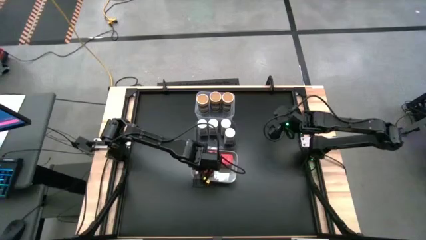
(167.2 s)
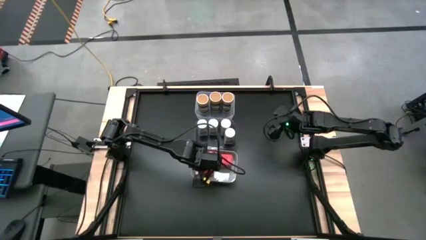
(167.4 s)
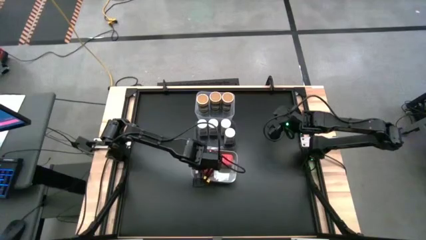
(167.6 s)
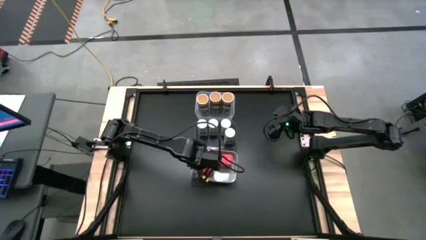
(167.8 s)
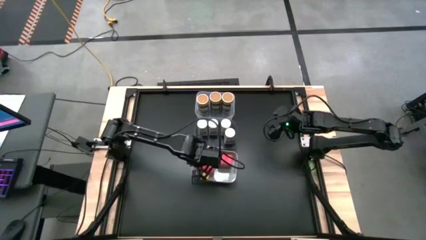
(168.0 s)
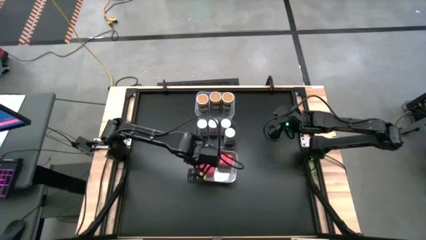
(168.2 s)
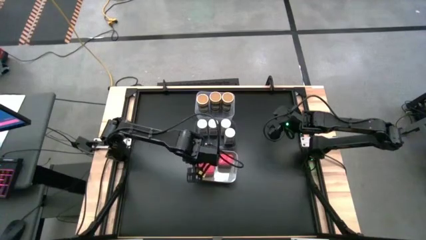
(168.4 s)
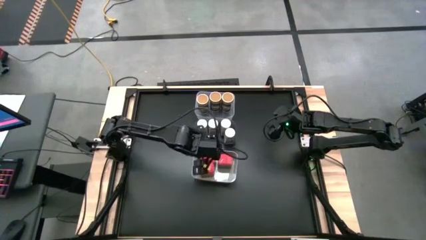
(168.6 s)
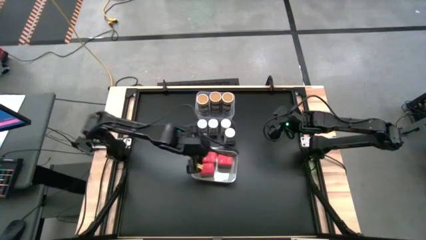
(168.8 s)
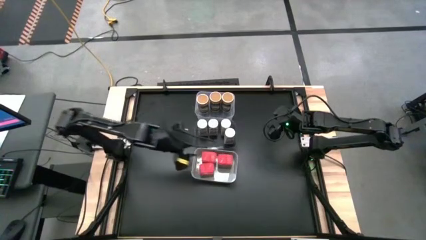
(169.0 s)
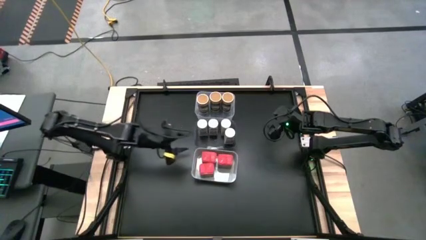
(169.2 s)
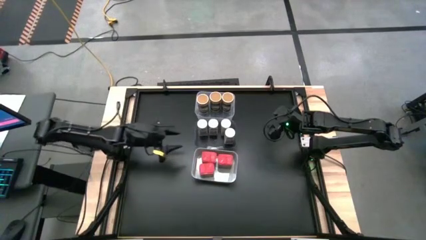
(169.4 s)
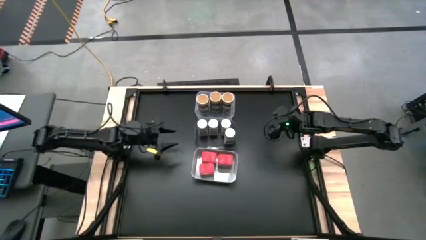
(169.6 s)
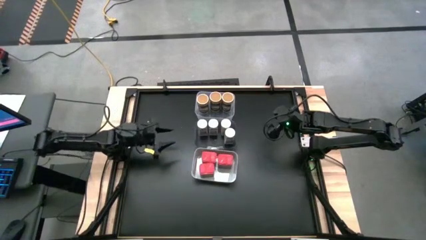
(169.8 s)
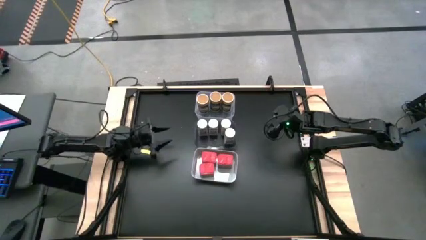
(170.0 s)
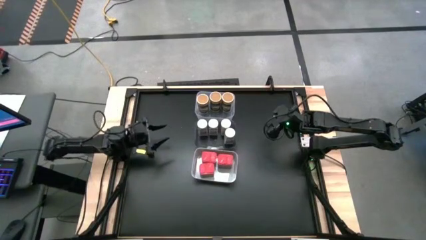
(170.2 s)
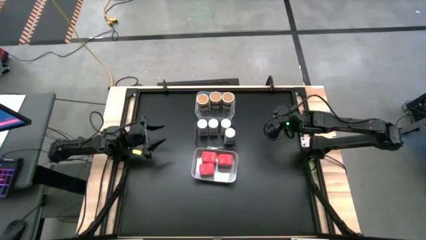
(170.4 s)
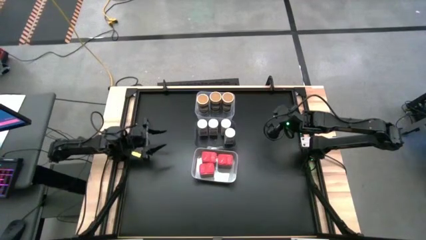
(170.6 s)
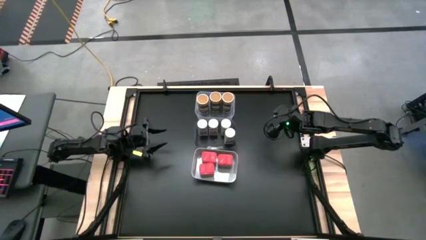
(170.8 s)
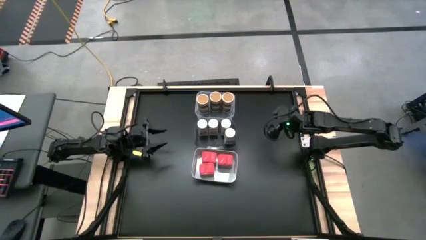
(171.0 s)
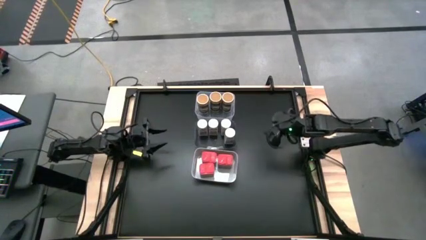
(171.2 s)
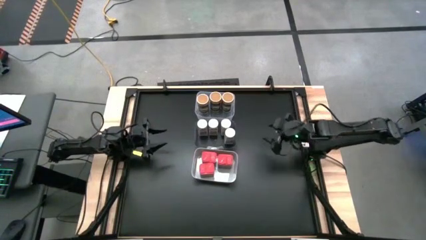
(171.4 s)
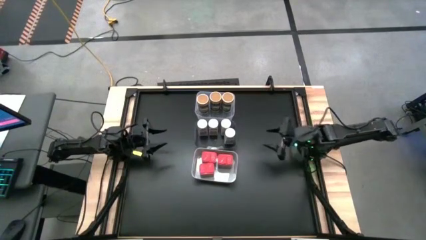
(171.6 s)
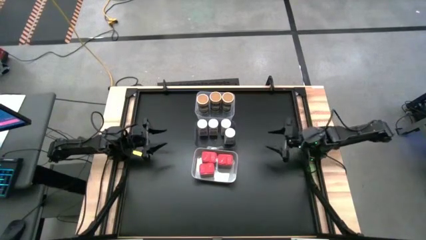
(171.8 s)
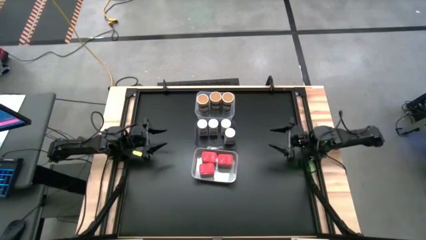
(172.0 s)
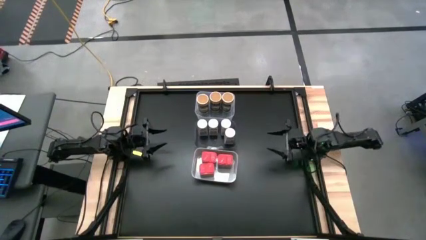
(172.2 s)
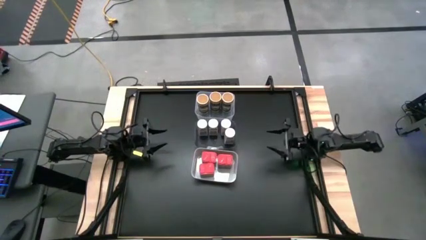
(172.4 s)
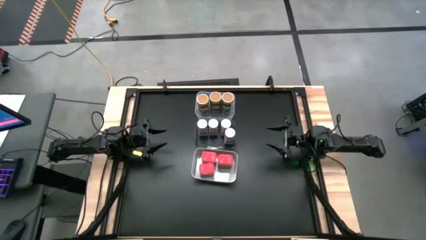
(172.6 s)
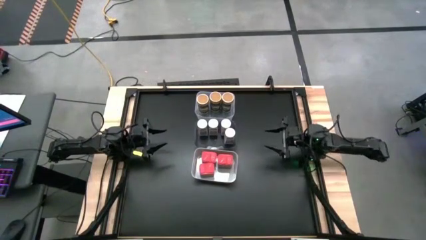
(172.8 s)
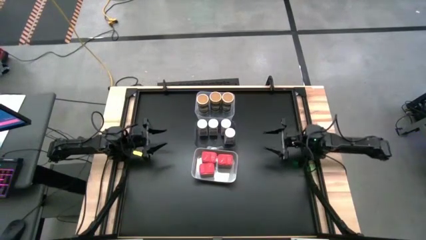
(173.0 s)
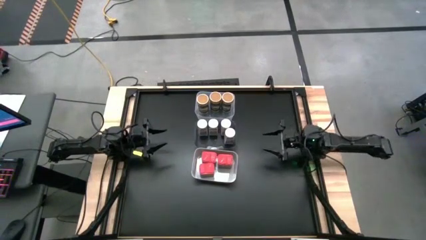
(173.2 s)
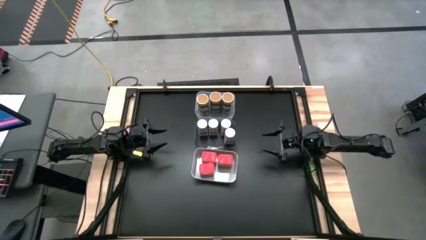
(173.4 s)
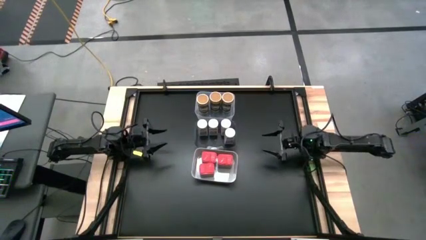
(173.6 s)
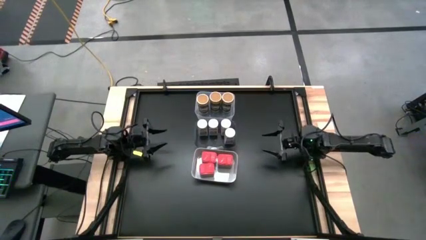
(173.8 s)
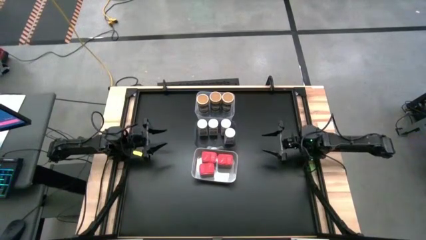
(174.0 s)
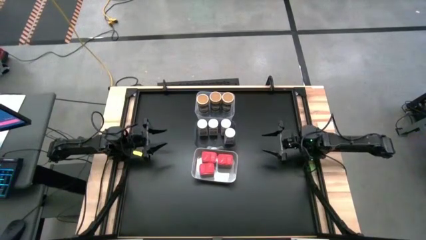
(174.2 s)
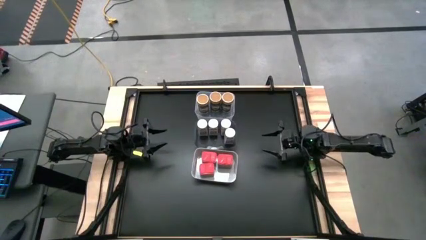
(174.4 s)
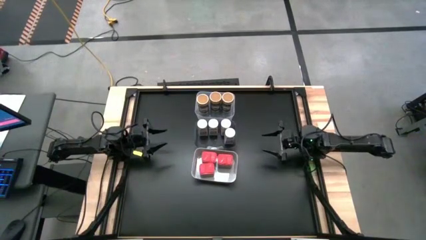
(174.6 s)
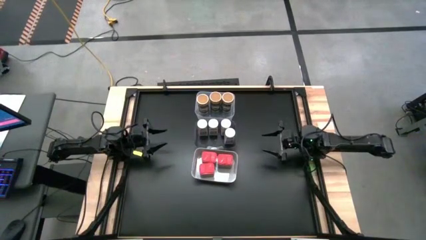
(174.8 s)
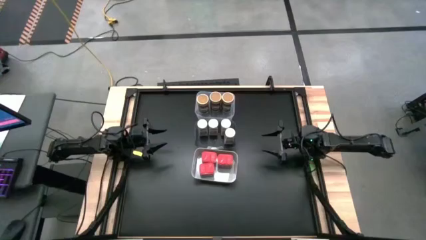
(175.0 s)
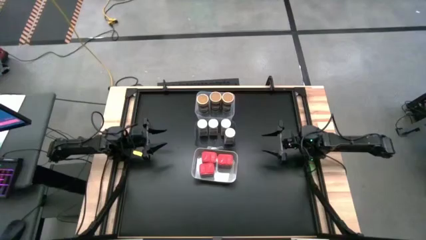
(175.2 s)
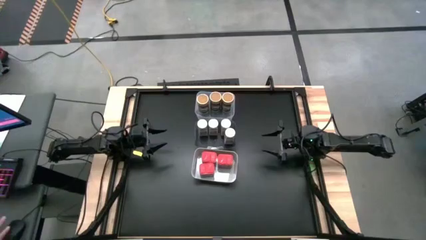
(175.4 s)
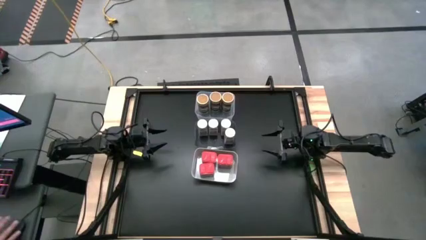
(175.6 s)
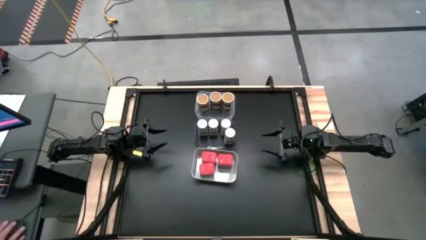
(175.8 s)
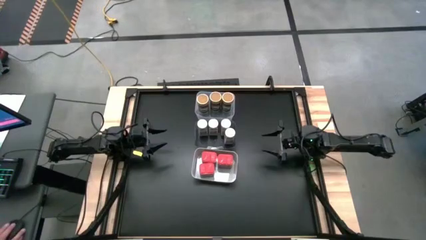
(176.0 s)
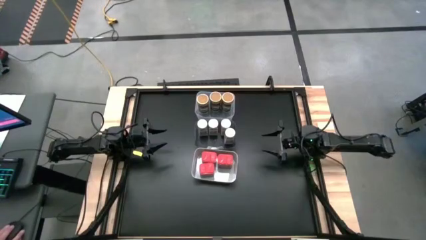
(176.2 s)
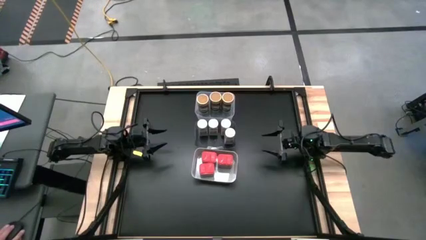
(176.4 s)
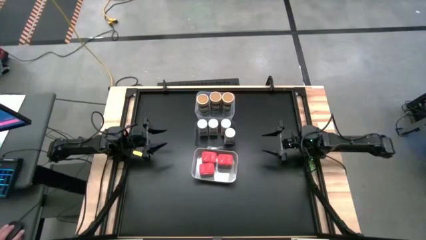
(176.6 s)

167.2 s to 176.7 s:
Task: Sort spices by type
Return to Home Position
